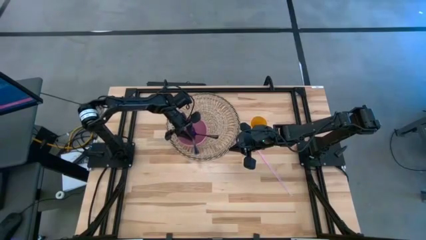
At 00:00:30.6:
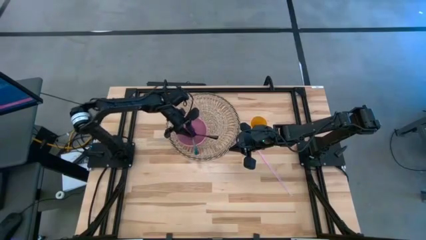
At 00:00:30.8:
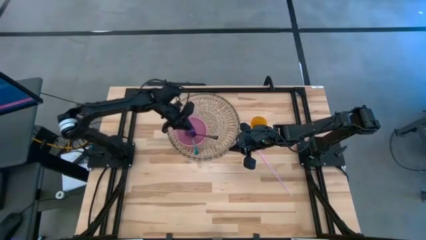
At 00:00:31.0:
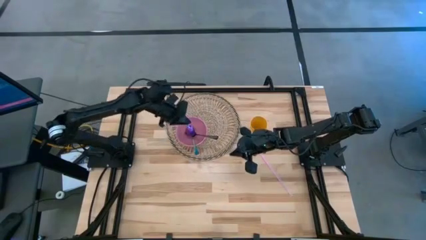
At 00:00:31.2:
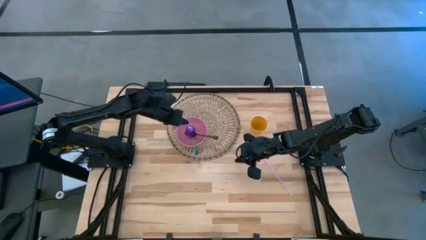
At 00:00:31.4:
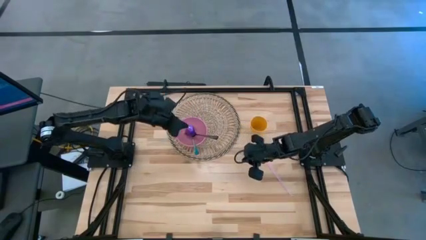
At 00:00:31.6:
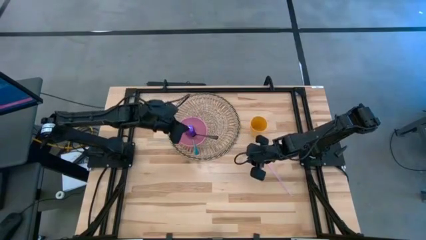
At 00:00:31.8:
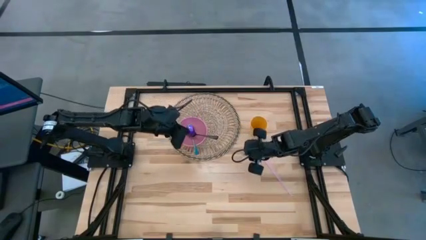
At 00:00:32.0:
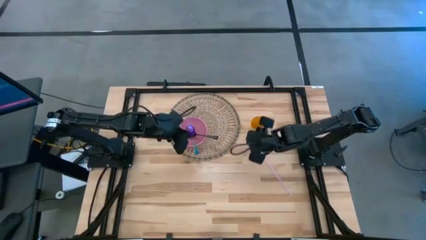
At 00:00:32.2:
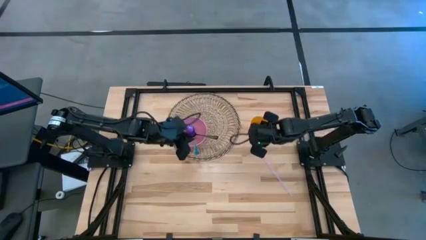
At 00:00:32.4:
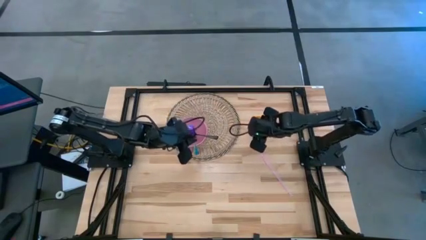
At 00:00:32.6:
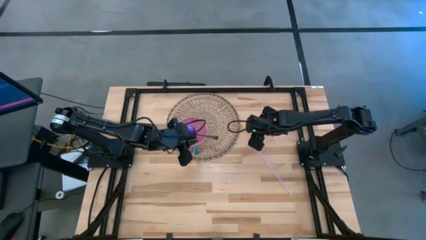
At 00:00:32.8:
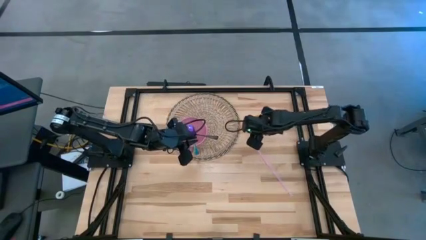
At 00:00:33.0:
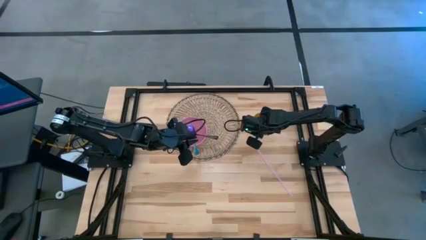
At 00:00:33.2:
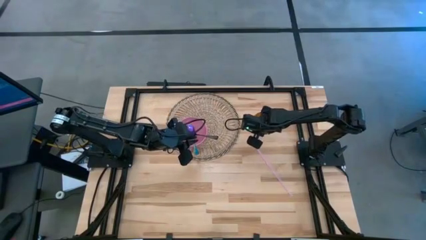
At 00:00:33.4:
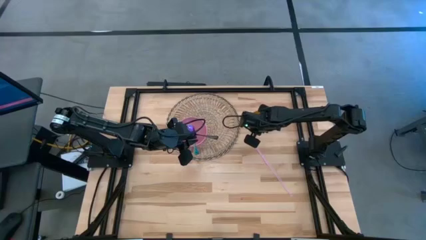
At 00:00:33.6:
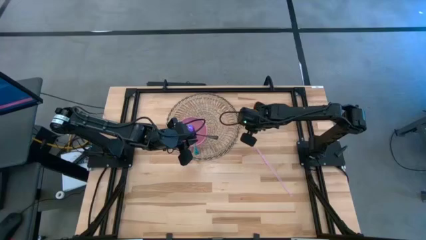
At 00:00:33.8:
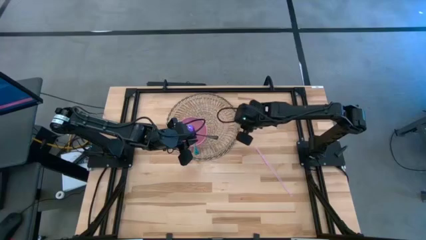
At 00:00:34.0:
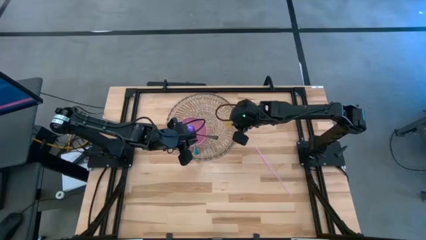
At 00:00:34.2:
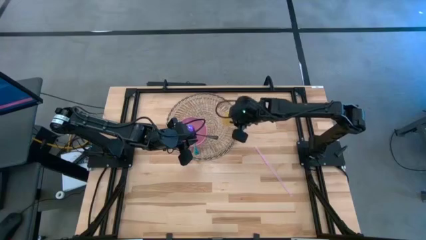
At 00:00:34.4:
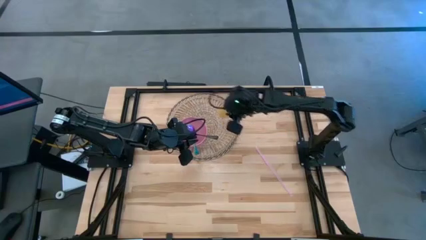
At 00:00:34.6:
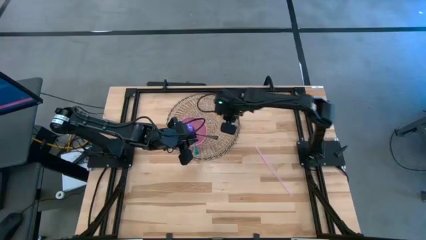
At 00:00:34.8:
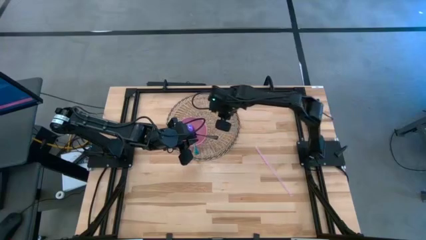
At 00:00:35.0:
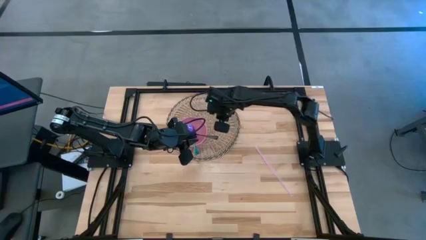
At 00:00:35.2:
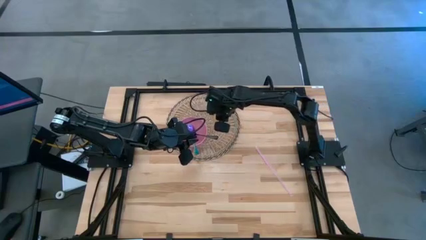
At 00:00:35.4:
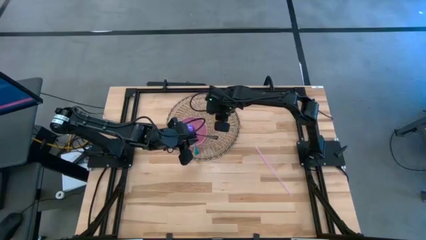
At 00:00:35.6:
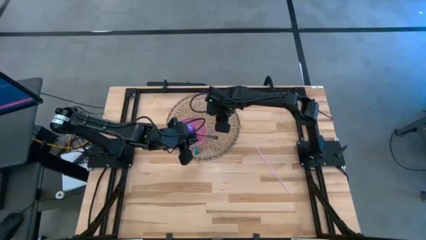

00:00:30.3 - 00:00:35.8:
Task: Pick & Place Utensil
Put the orange cup to the top right of the pink bowl on the placemat

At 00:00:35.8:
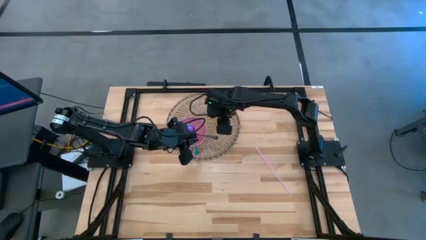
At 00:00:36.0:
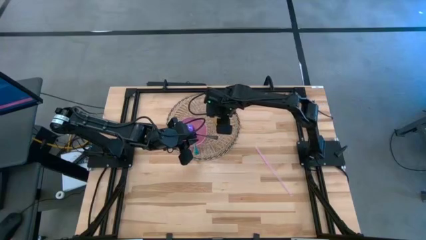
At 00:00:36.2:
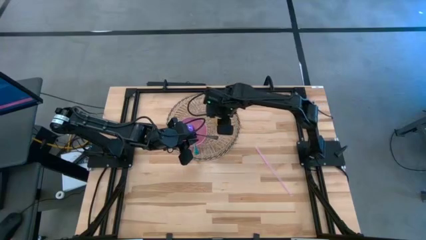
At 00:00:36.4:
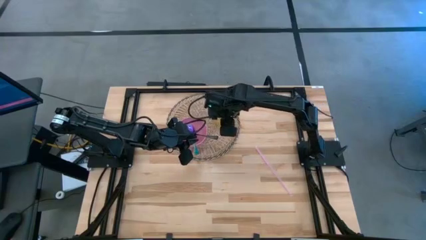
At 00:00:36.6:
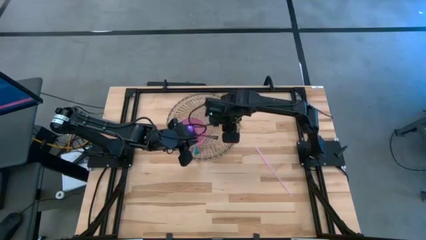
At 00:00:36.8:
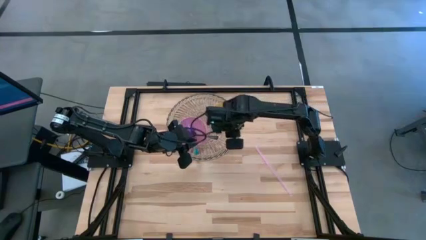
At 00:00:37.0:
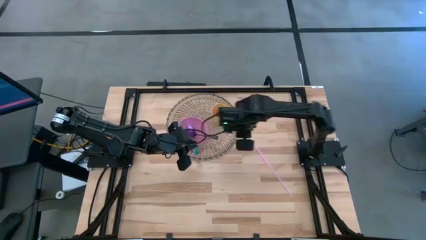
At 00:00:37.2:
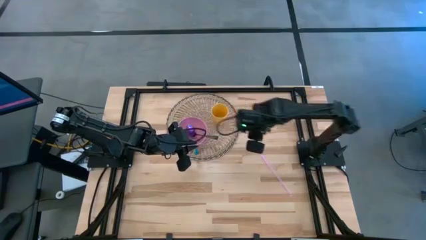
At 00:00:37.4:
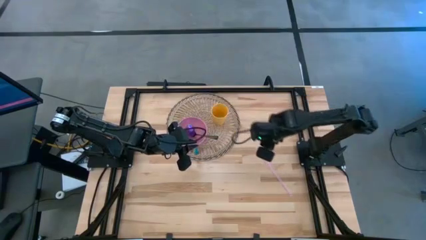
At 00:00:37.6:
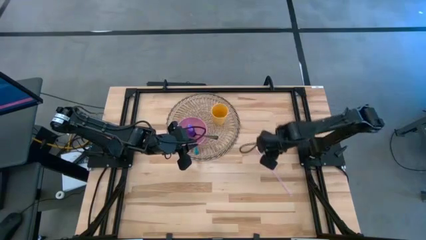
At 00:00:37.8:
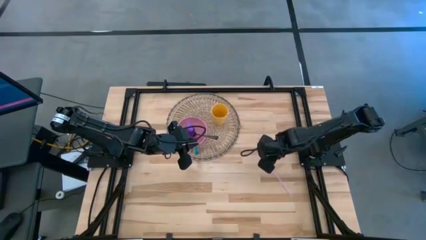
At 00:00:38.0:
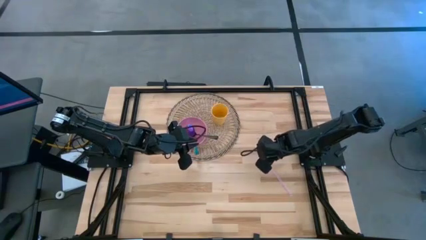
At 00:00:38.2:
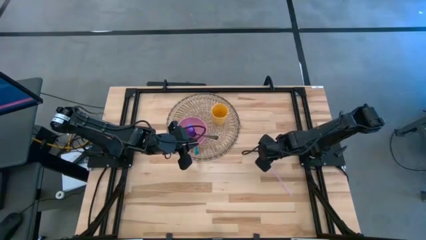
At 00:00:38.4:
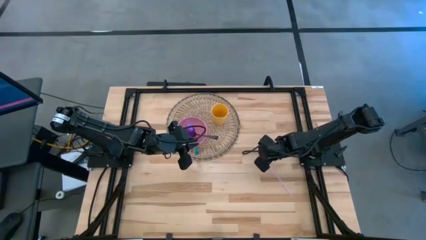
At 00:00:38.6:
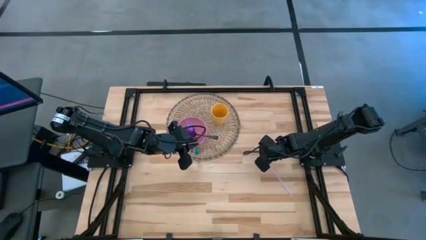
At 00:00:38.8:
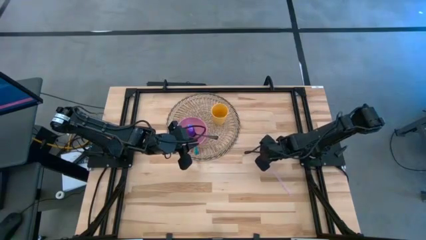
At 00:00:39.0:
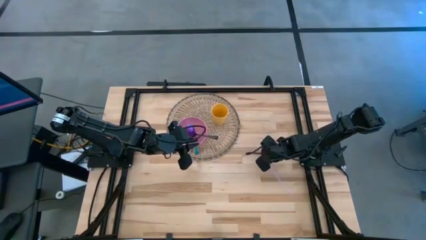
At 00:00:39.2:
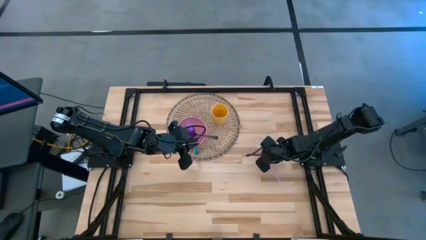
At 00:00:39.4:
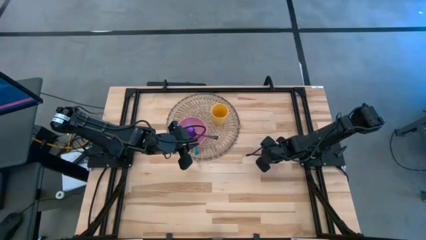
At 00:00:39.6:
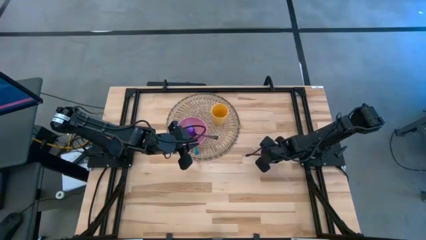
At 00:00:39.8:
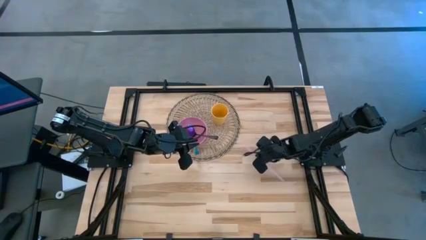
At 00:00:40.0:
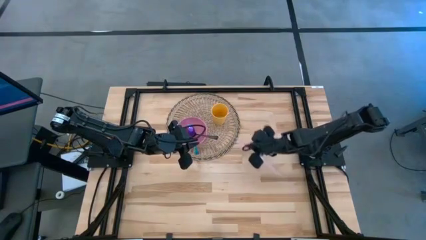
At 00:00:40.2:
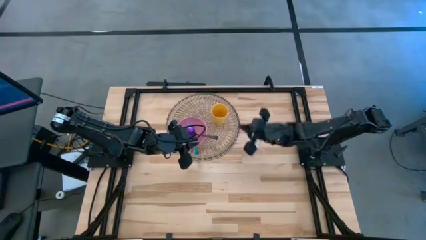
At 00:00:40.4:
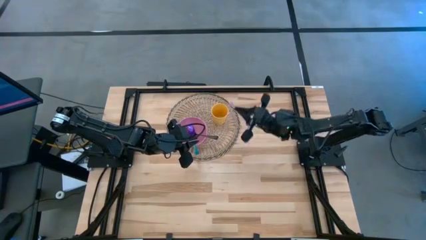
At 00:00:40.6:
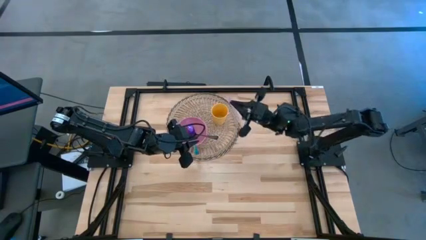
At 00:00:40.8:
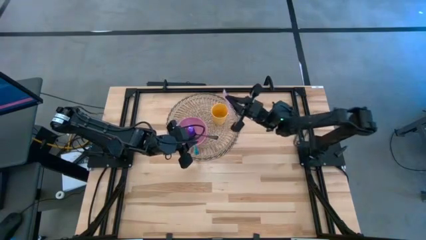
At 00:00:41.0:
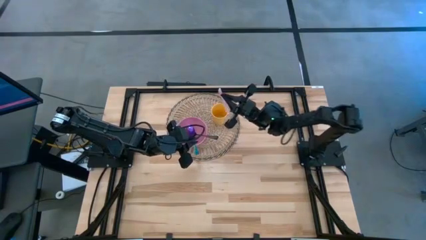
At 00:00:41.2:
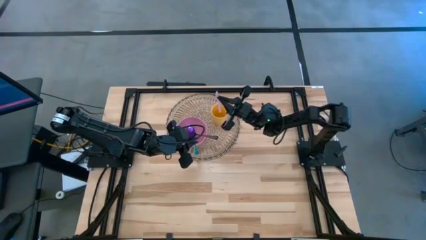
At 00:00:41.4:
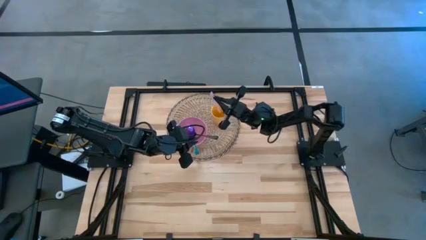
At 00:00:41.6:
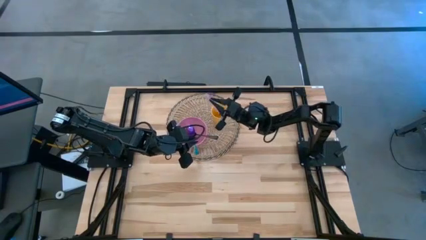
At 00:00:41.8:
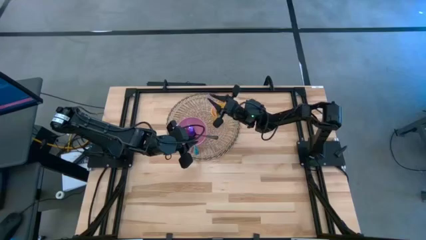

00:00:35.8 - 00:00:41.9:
Put the pink straw on the orange cup
